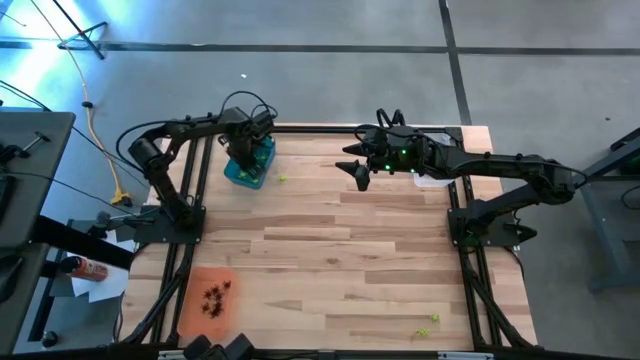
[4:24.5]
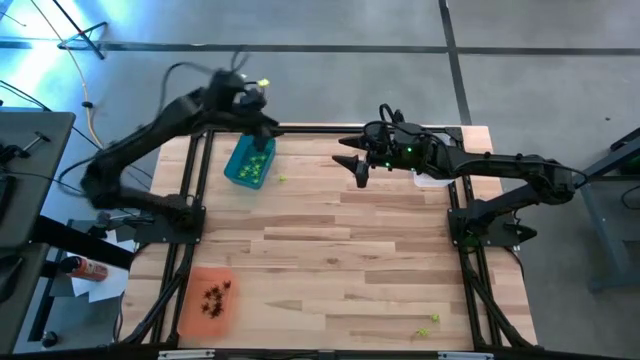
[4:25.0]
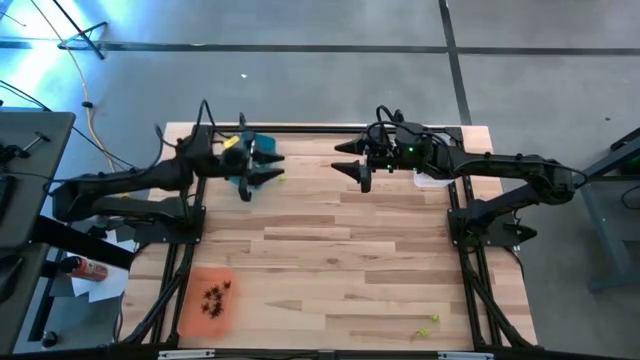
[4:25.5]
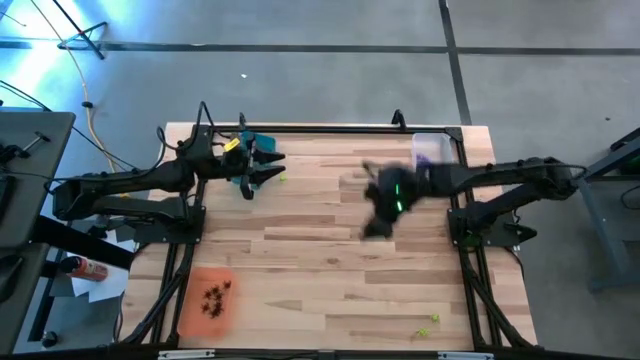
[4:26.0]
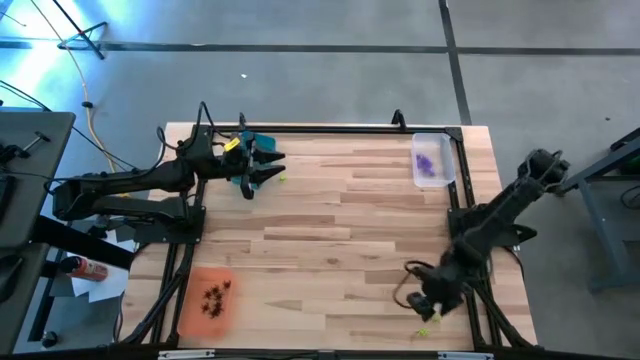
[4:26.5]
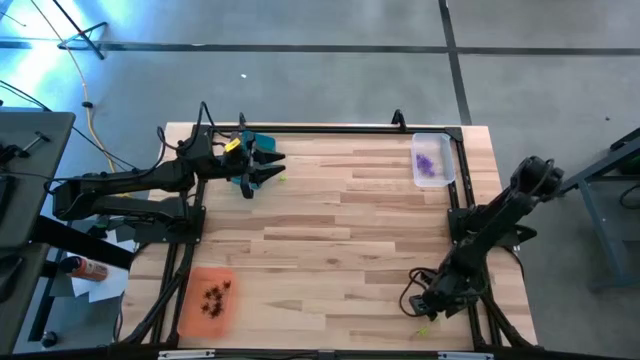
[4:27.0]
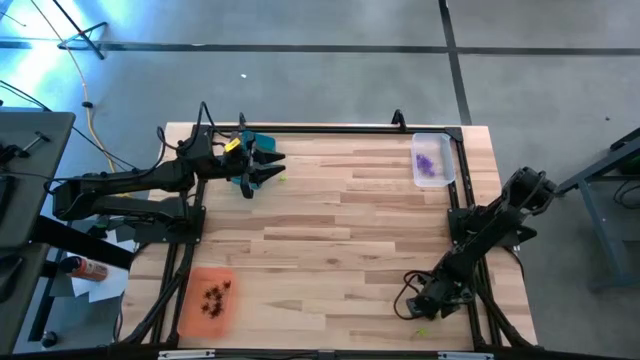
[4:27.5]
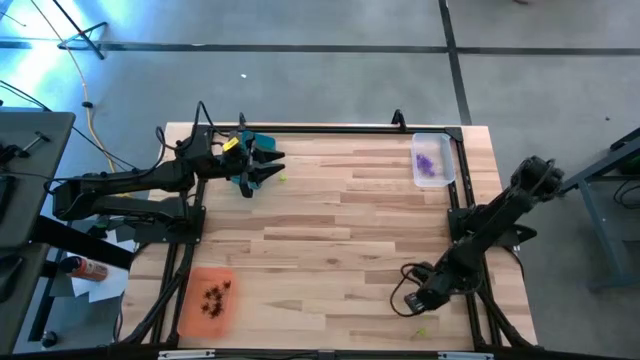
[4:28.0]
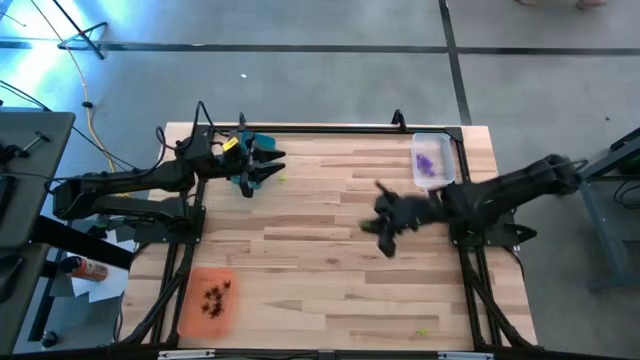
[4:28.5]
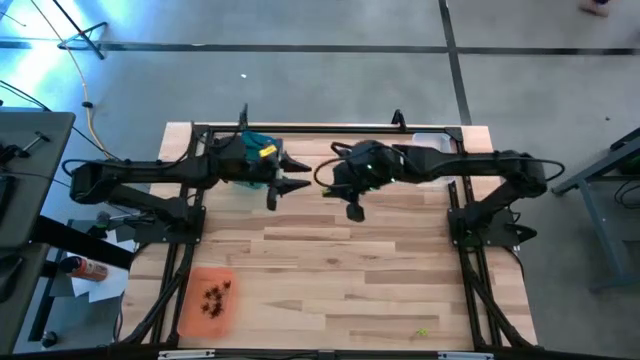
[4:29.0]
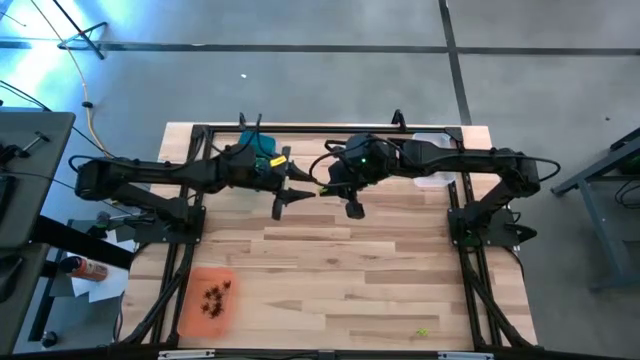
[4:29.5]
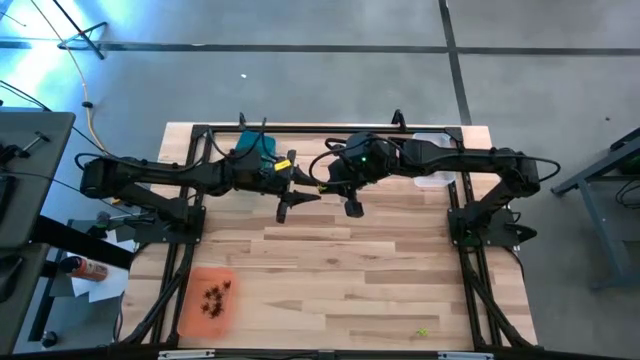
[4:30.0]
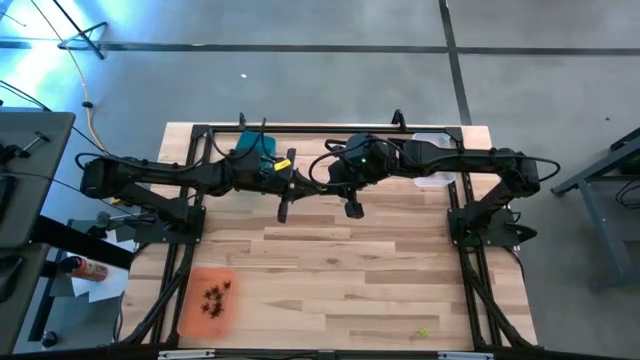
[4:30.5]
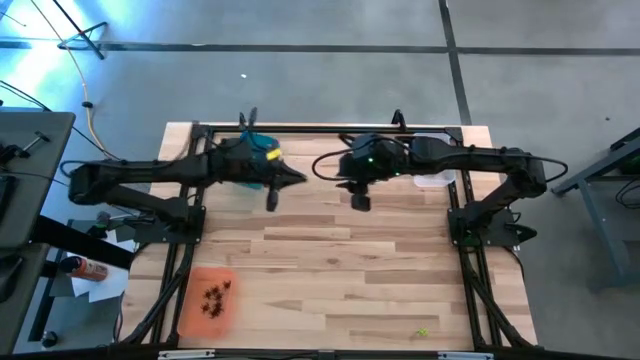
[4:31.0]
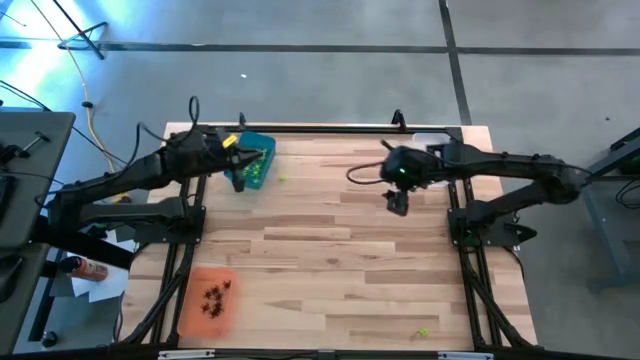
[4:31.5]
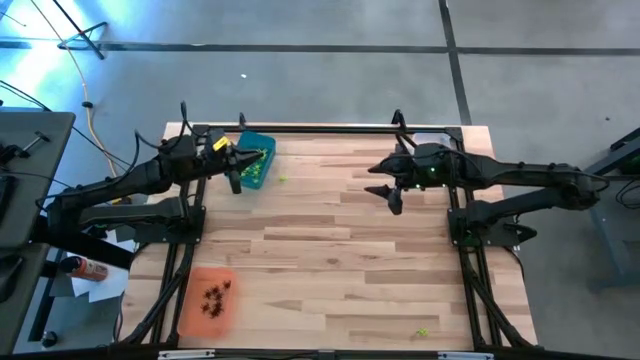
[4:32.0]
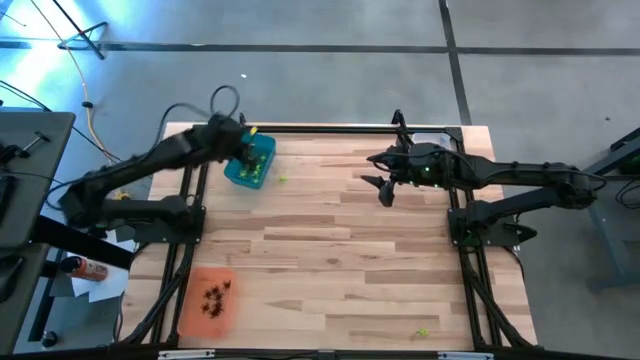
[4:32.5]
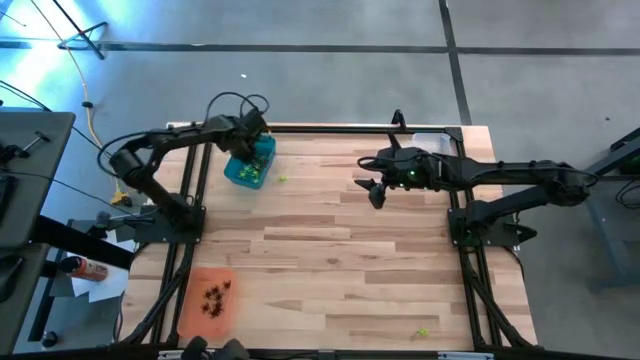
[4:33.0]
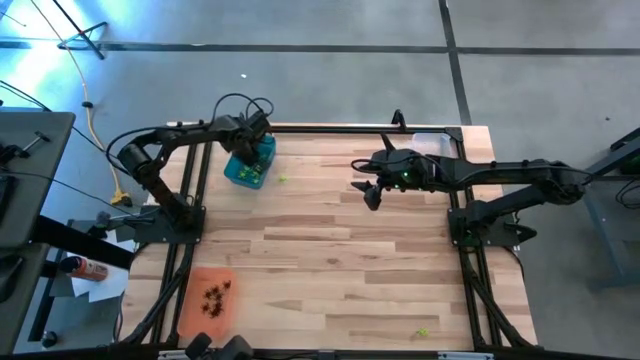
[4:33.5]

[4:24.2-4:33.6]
Task: Sort Halloween decoration
Put the green spider toy into the blue bin

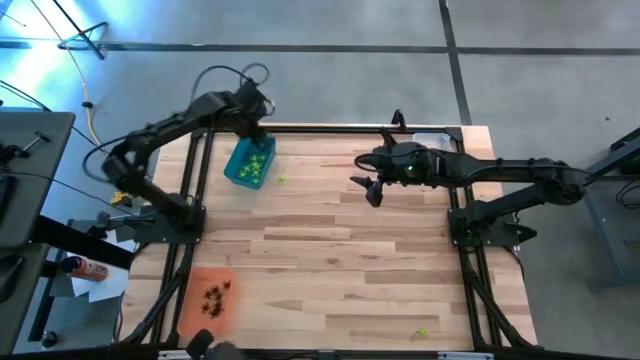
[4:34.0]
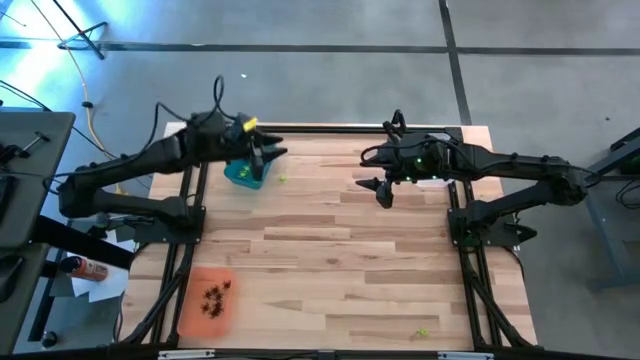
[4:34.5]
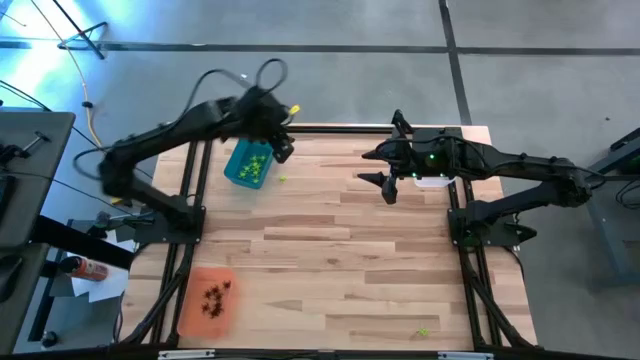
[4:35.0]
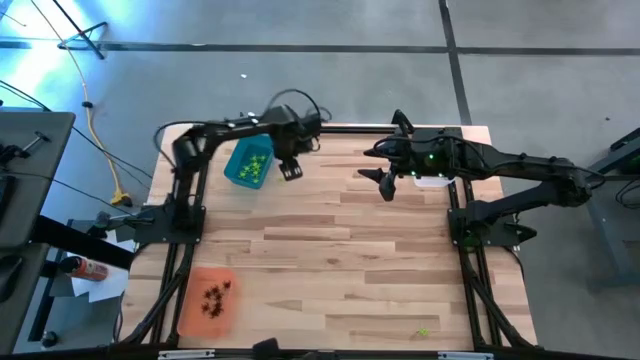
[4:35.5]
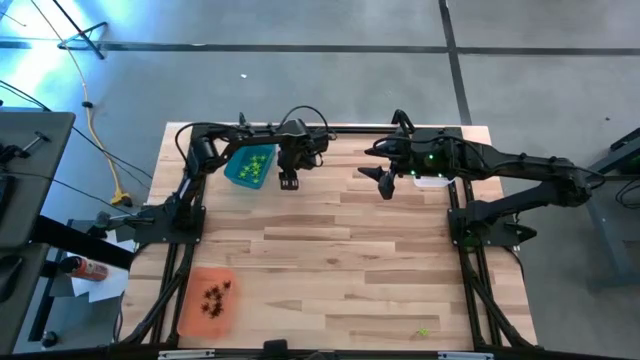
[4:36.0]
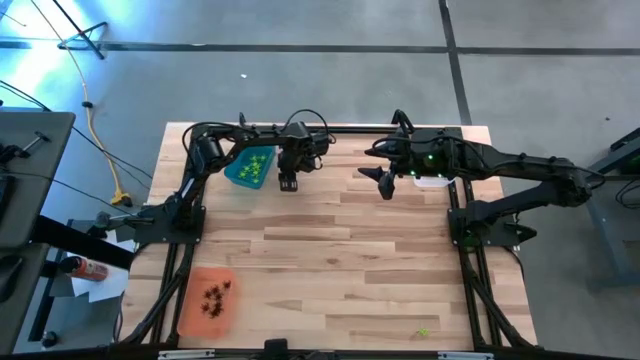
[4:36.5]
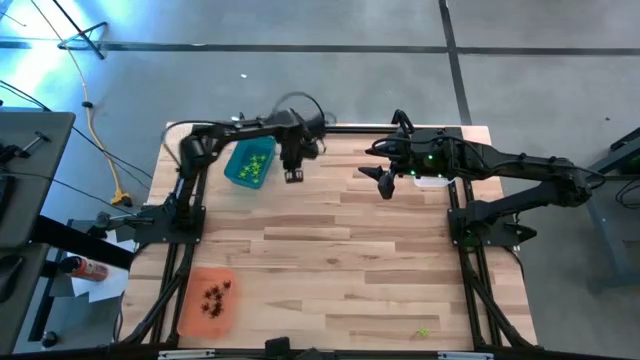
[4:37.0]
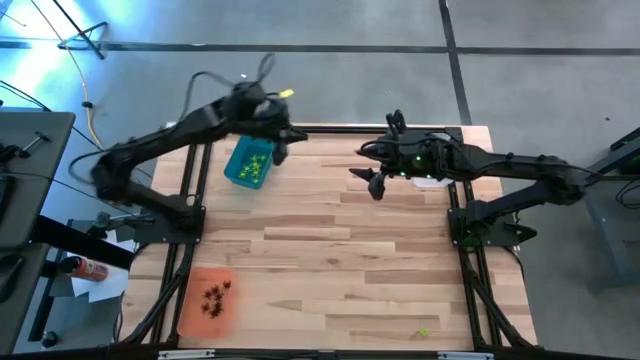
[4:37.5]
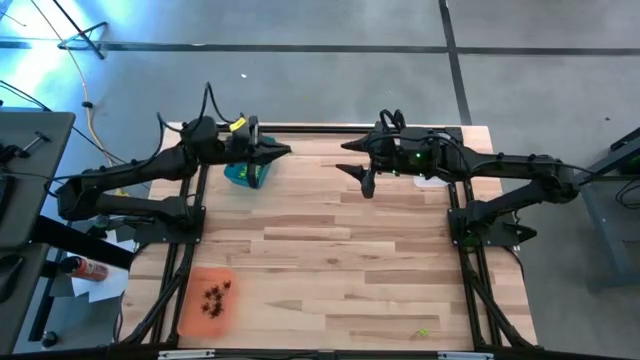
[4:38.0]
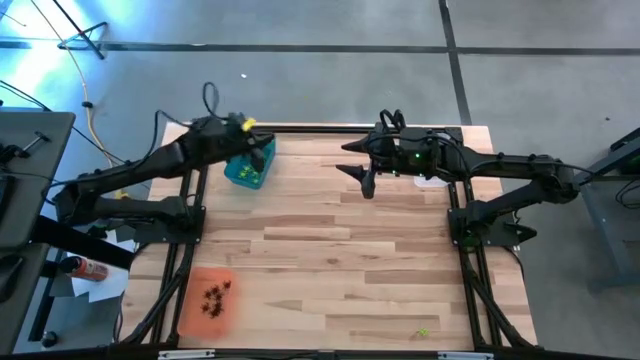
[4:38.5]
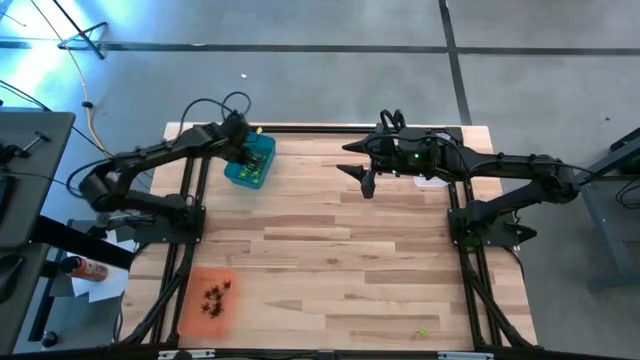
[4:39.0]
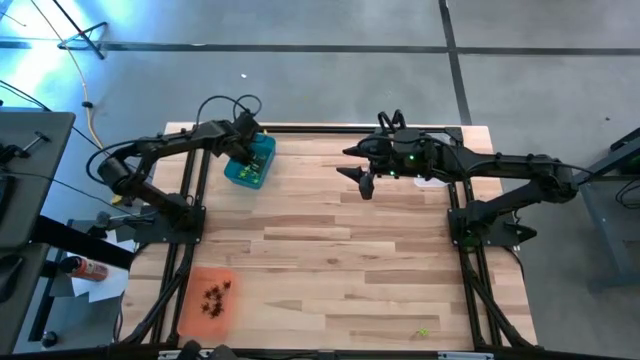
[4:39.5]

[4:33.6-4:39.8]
Put the green spider toy into the blue bin

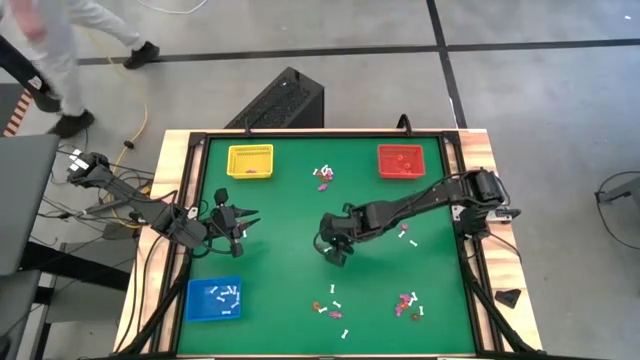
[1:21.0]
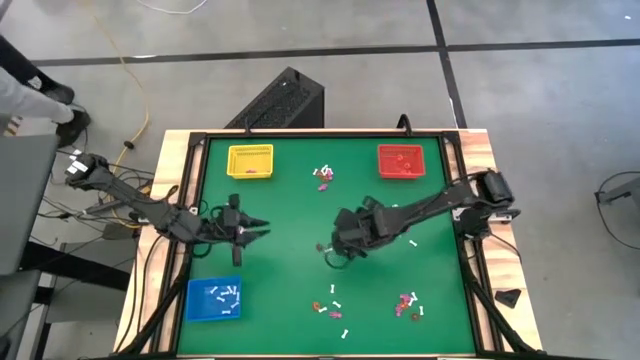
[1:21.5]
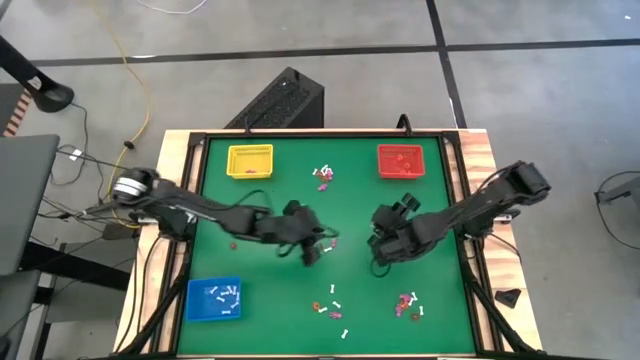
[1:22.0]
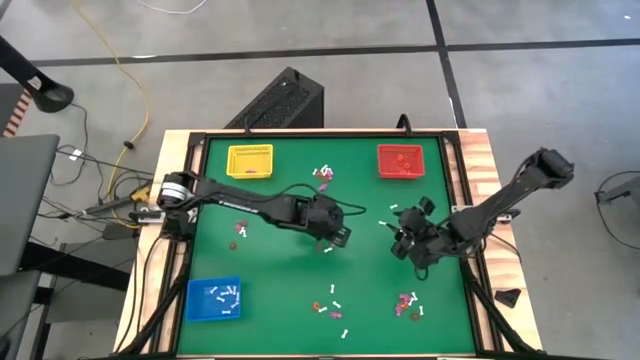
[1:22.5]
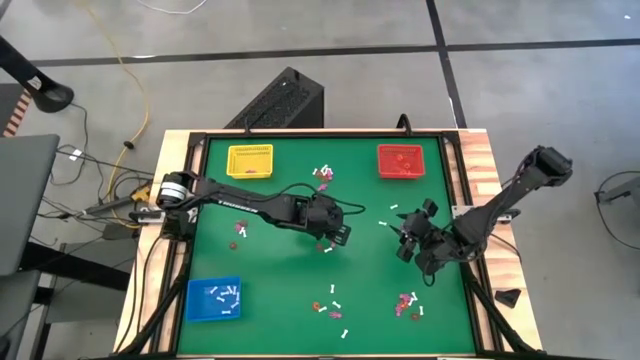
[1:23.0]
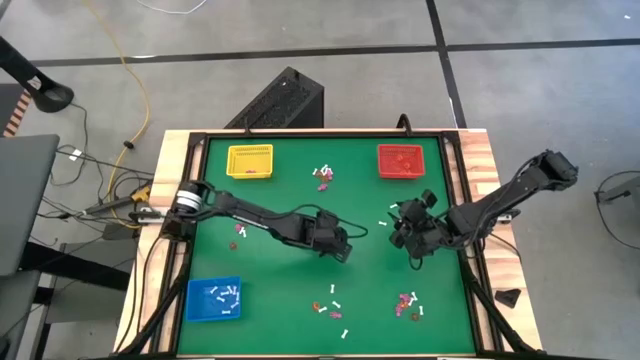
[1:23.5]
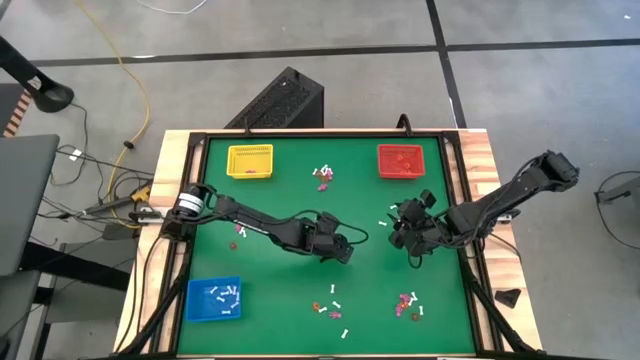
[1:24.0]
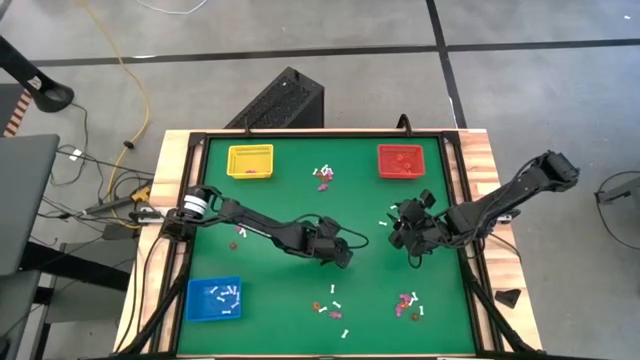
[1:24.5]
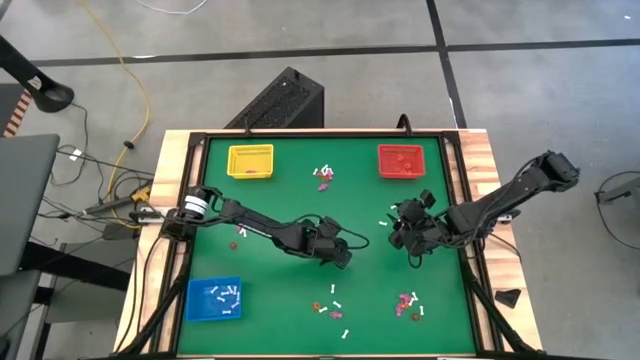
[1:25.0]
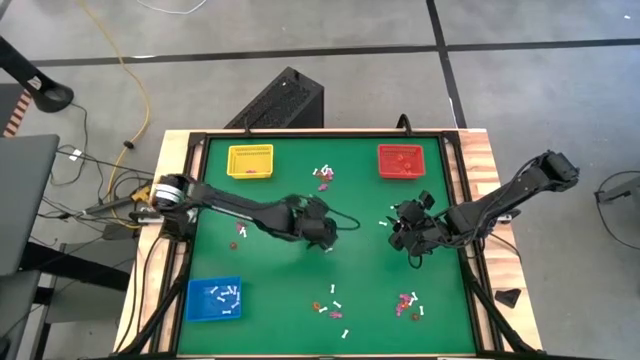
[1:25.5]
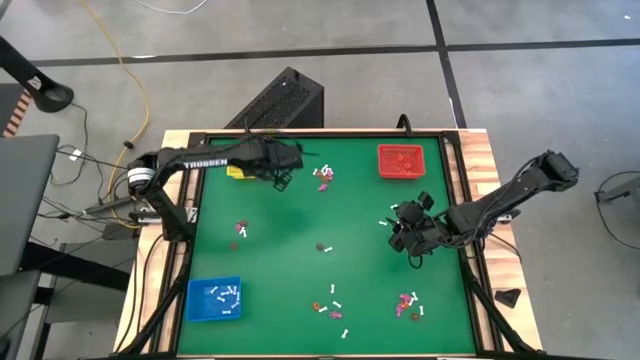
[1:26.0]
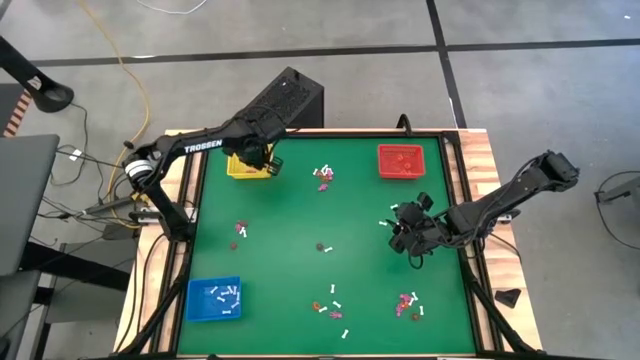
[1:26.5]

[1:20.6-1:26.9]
Task: Sort Halloween decoration
Put the pink skeleton toy into the yellow bin
